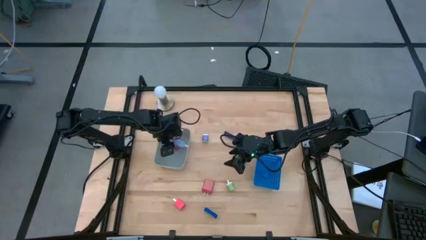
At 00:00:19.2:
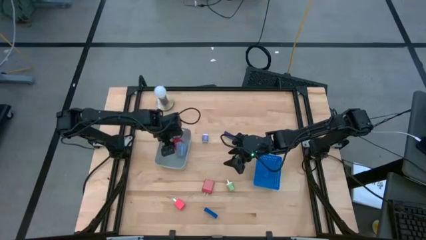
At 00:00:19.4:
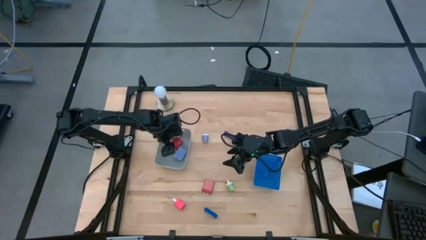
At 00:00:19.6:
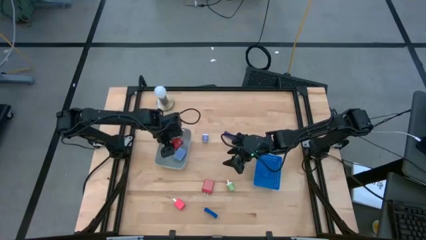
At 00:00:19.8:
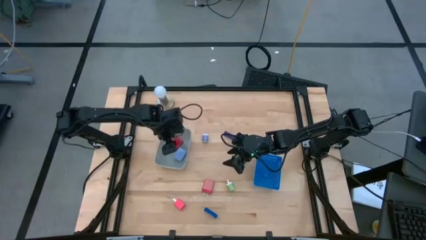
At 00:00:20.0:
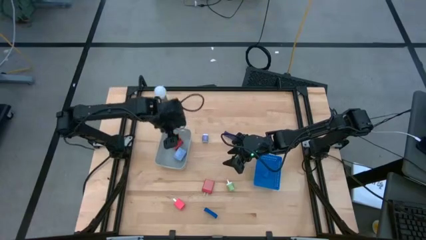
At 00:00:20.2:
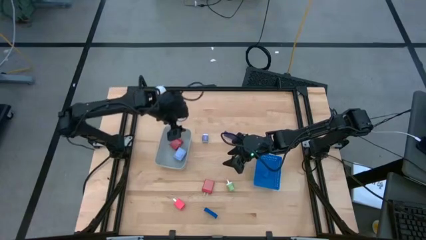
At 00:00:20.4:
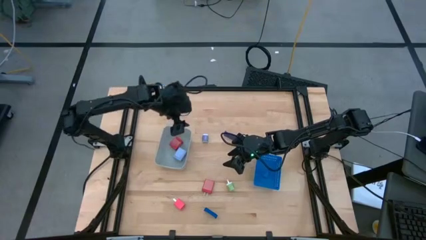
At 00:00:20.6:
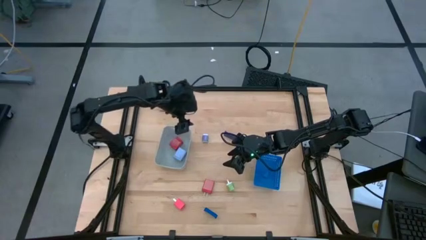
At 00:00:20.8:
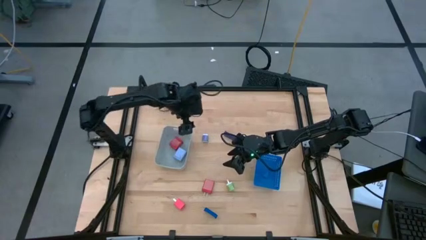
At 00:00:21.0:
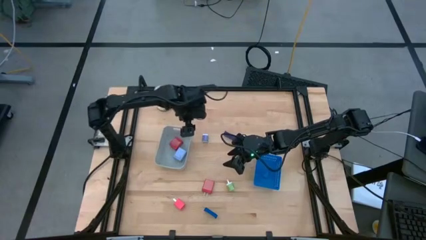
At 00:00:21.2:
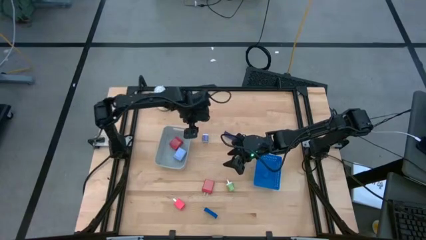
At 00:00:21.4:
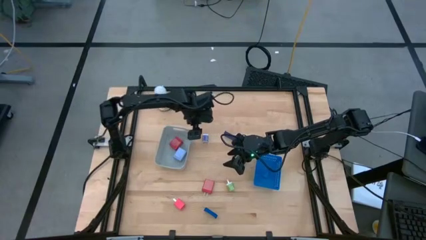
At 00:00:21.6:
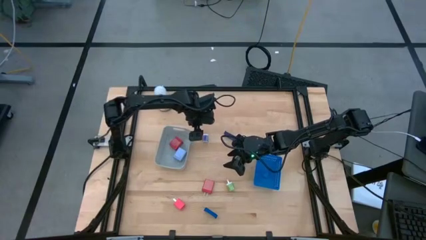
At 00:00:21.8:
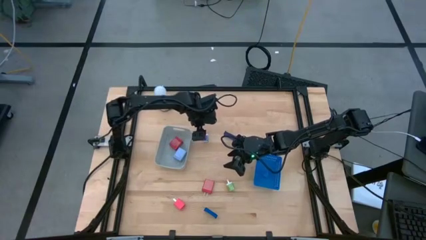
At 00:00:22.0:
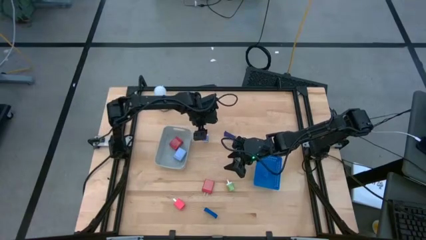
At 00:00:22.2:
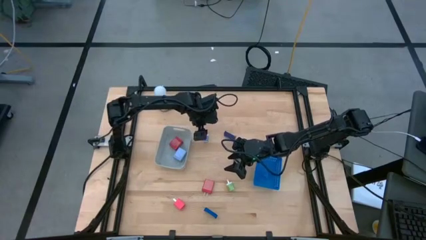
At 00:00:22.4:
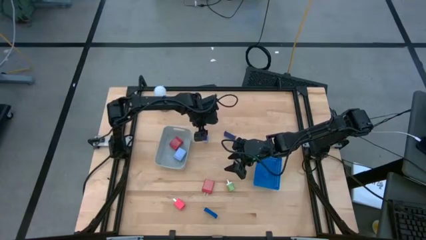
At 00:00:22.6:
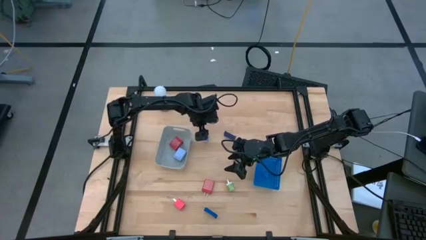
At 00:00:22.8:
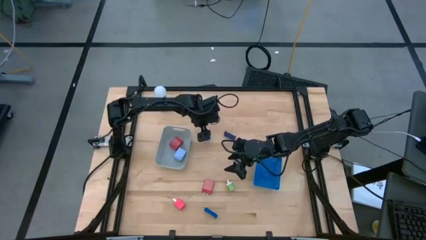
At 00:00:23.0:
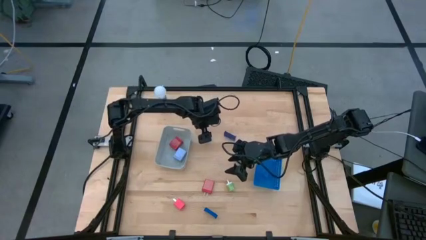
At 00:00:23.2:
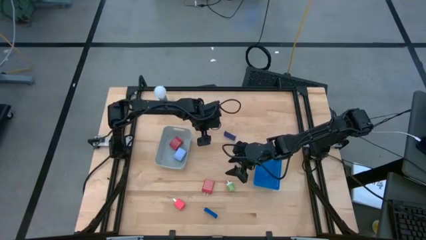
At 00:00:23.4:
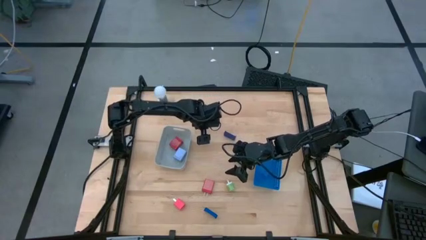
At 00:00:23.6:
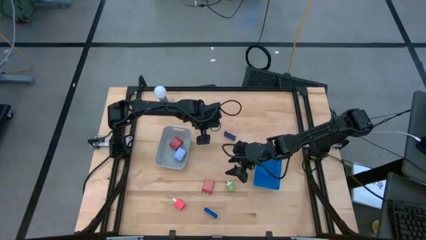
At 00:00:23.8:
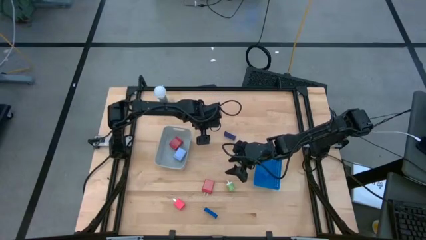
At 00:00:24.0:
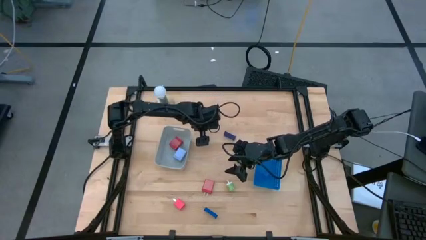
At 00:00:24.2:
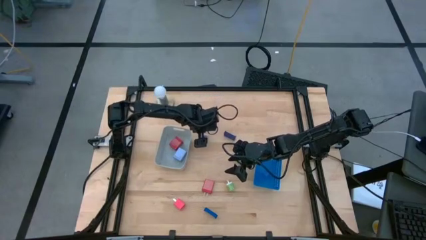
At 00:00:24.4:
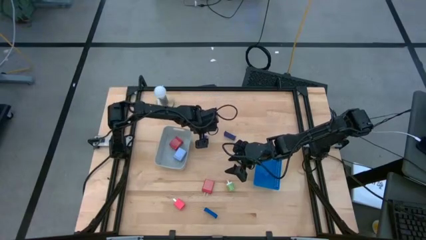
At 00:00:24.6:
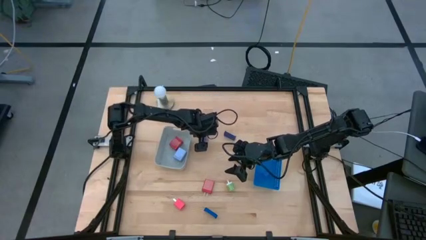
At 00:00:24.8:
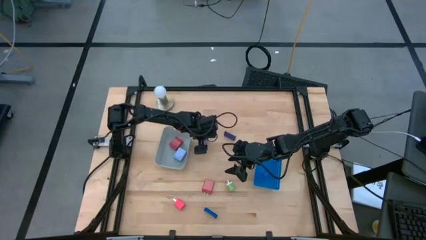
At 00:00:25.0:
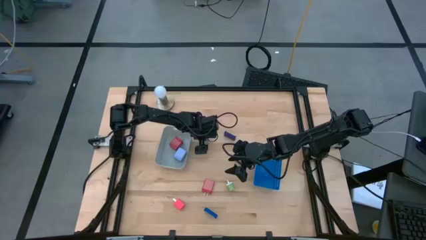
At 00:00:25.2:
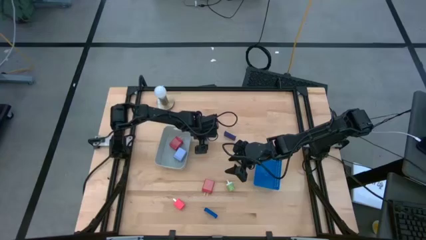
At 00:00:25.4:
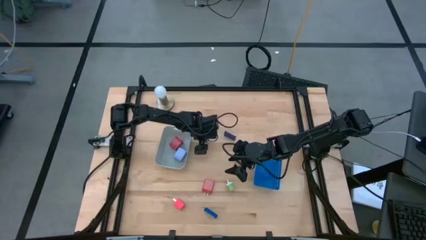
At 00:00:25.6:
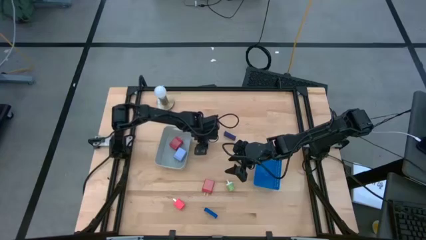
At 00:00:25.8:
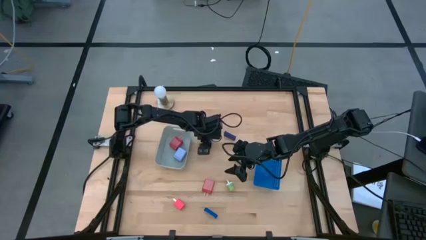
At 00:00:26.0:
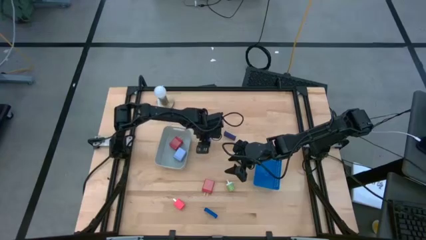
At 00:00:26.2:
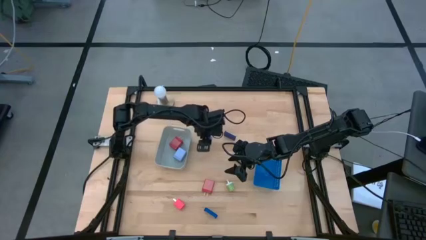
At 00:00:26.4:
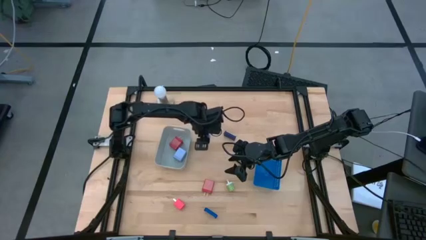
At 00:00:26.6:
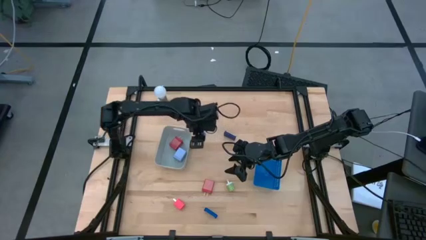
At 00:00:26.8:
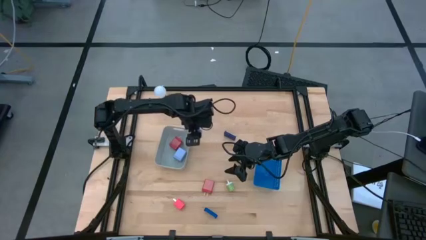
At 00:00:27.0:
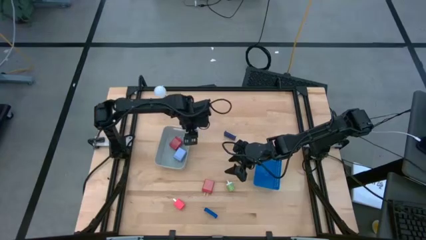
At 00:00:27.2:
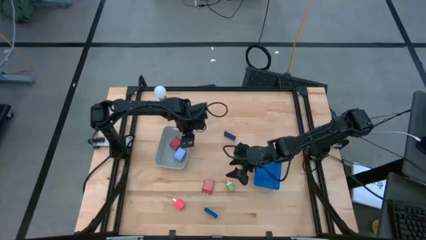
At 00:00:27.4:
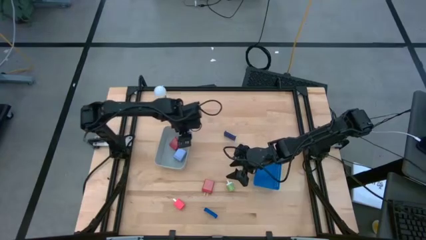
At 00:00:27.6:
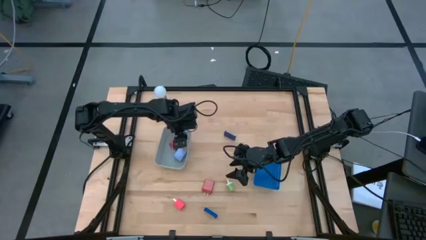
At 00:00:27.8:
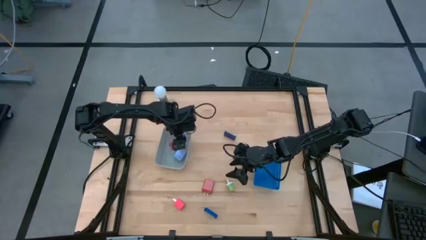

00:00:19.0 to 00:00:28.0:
Task: Pick & Place Office items
Put the purple charger adapter into the gray bin

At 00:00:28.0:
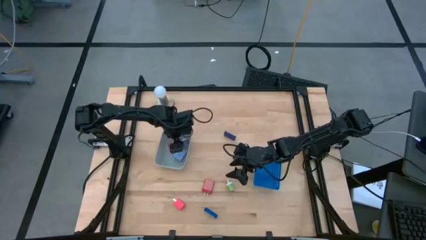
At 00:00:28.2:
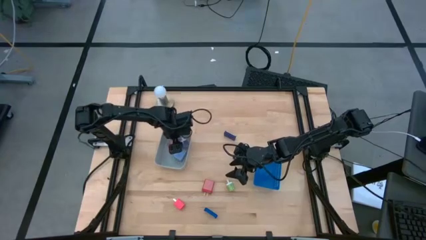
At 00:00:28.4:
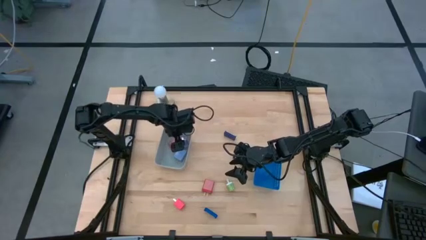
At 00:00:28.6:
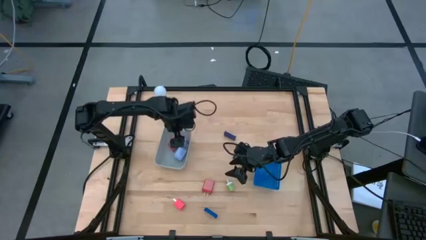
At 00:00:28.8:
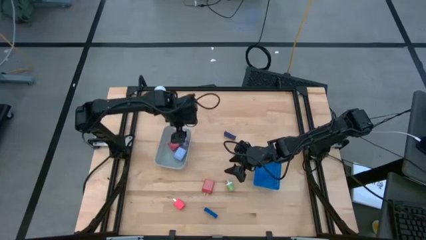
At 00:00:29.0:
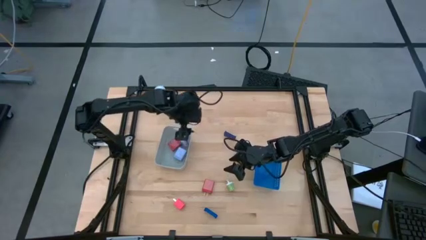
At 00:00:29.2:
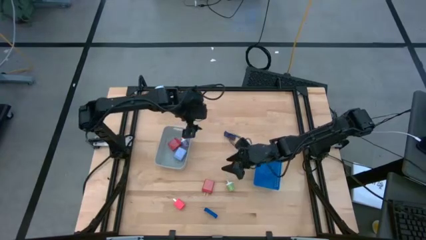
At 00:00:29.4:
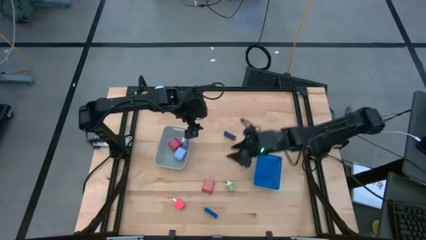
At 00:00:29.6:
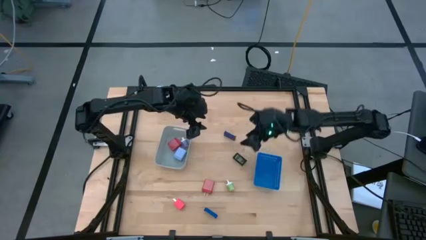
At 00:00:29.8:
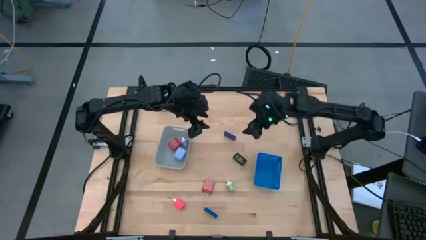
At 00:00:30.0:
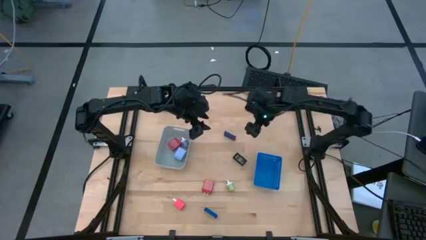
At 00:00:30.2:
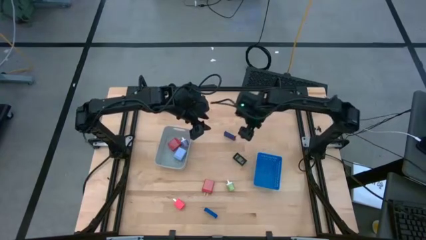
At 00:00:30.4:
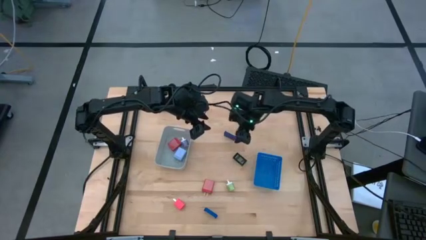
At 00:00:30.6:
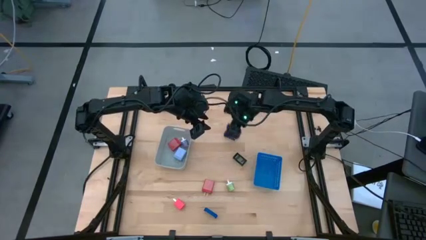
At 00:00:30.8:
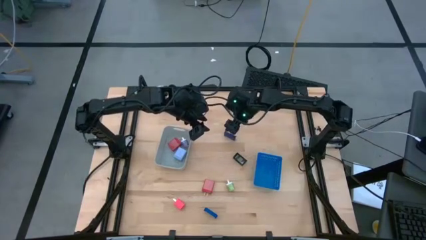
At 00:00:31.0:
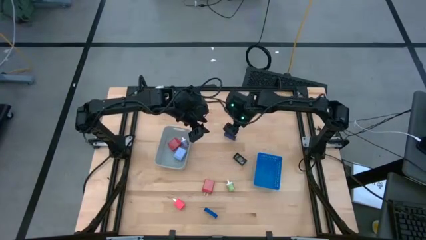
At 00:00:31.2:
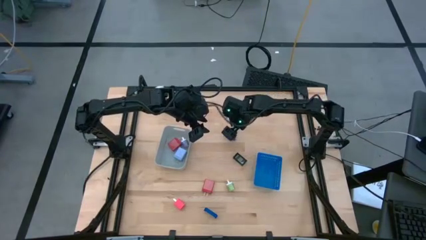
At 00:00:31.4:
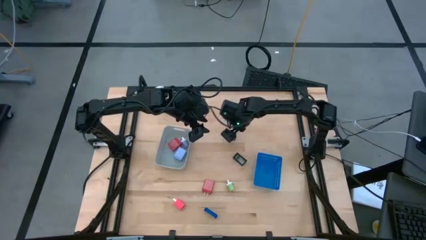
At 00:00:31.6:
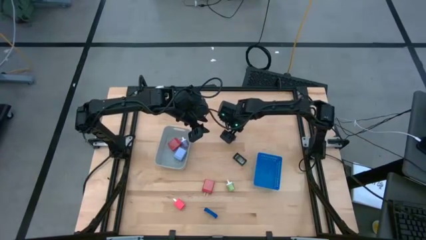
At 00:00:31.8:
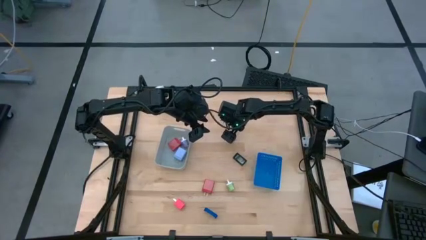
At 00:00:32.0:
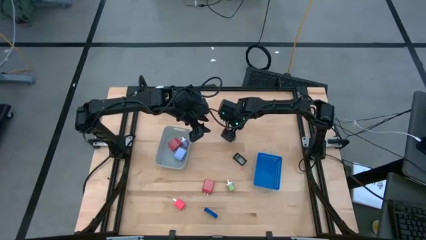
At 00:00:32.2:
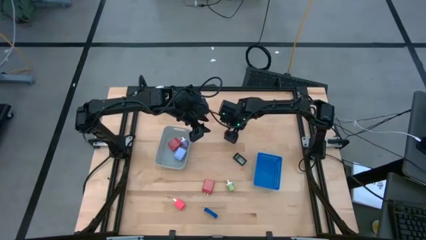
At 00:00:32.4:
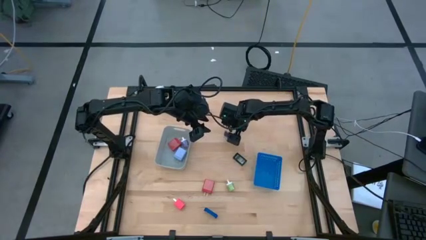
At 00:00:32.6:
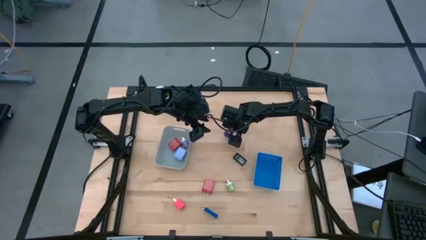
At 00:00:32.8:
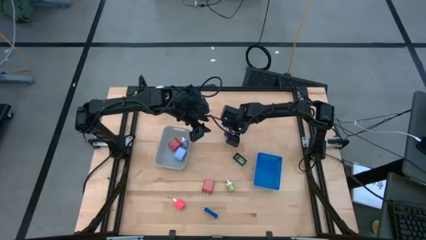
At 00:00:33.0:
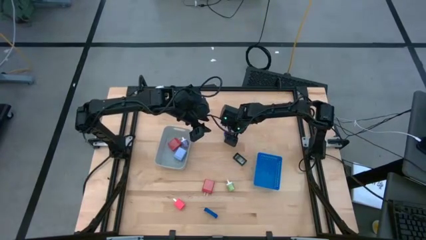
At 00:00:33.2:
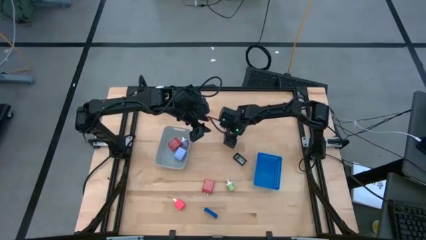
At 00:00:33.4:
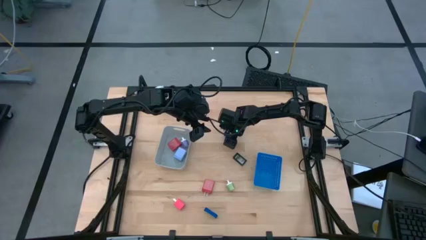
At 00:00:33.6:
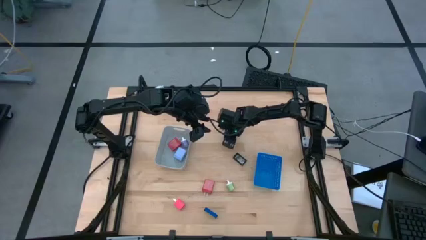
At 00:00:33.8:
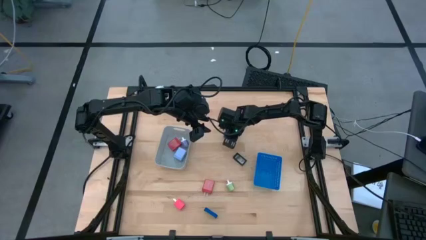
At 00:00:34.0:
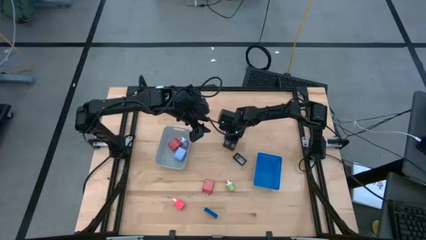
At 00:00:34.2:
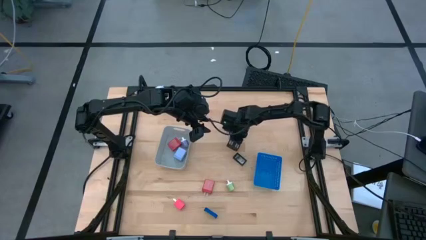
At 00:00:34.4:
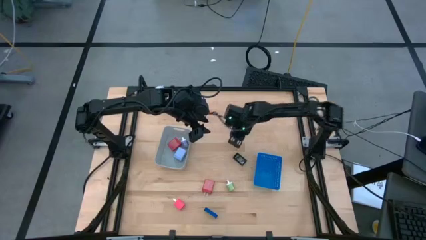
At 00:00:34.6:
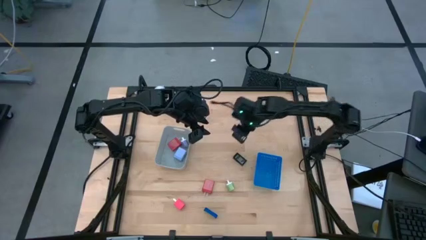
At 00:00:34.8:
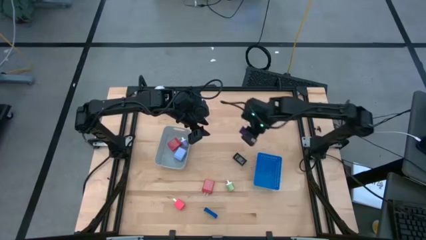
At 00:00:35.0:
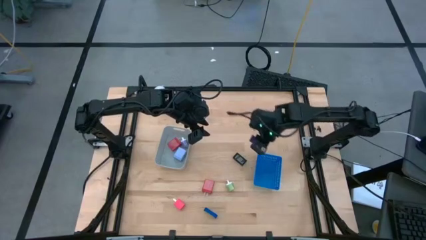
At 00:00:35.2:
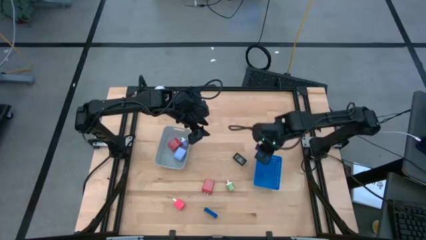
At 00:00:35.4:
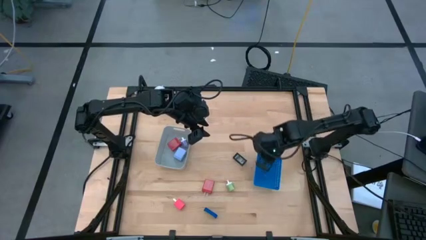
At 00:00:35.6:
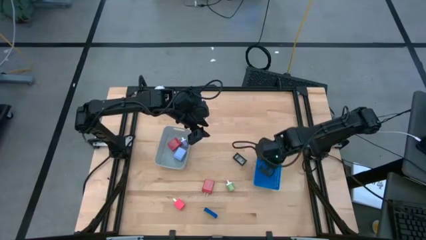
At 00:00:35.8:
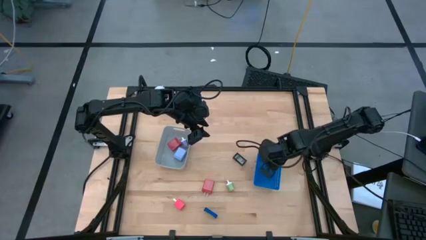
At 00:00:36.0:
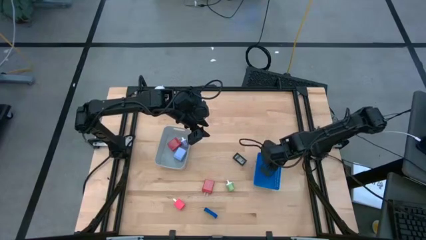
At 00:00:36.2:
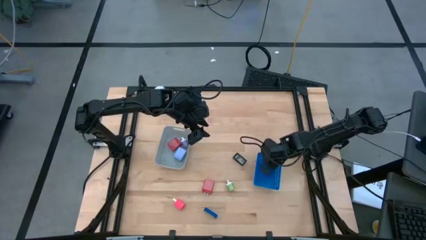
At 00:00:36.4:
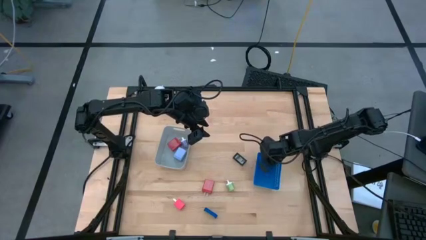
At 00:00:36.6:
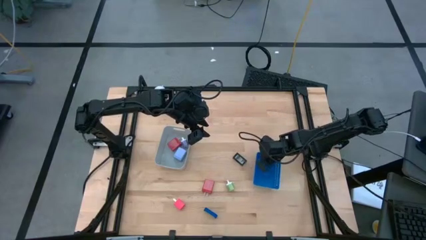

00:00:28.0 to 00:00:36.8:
Put the top blue digital clock into the blue bin
